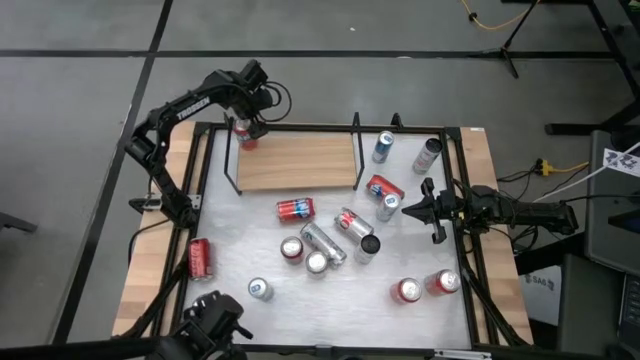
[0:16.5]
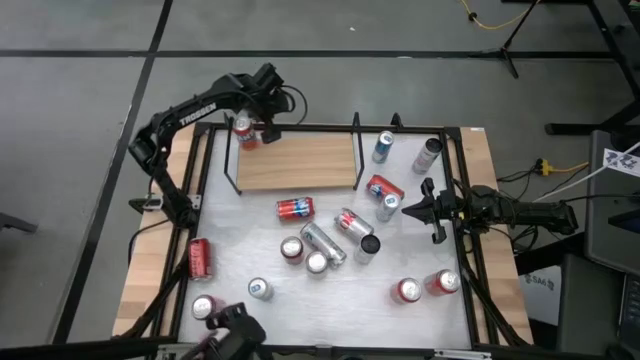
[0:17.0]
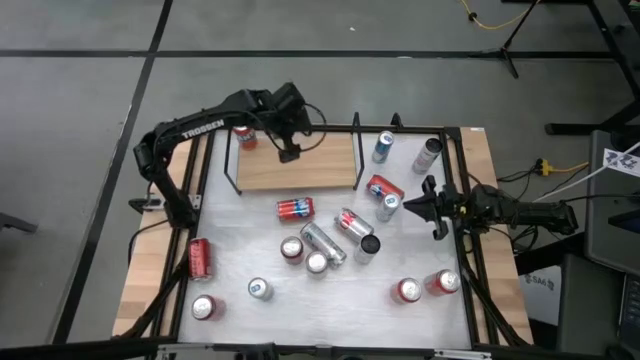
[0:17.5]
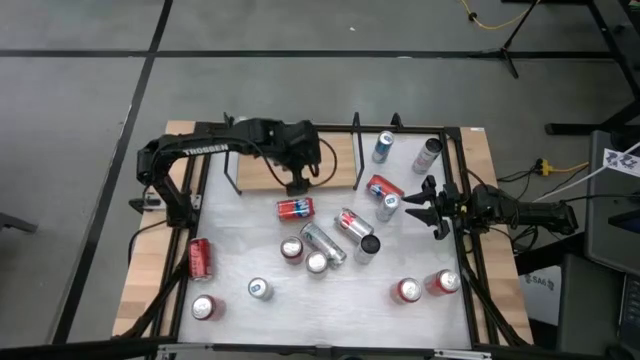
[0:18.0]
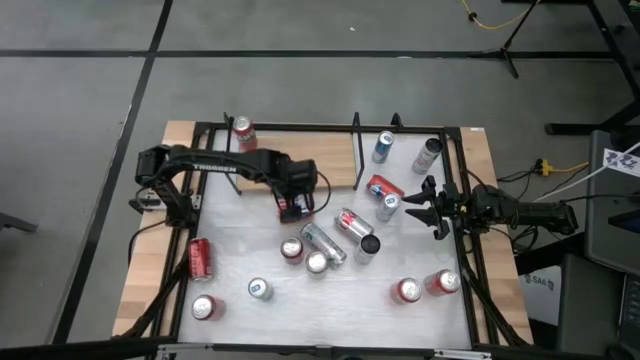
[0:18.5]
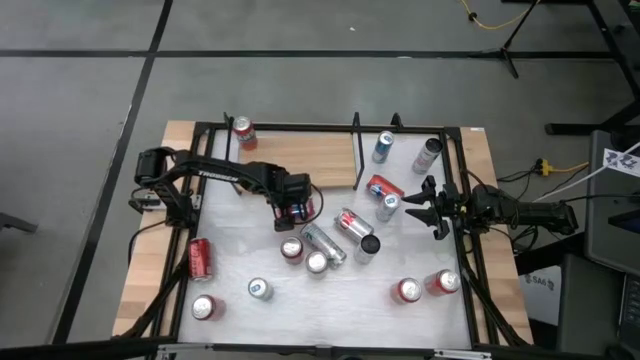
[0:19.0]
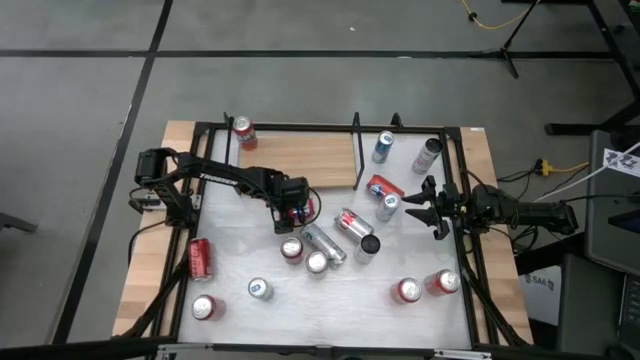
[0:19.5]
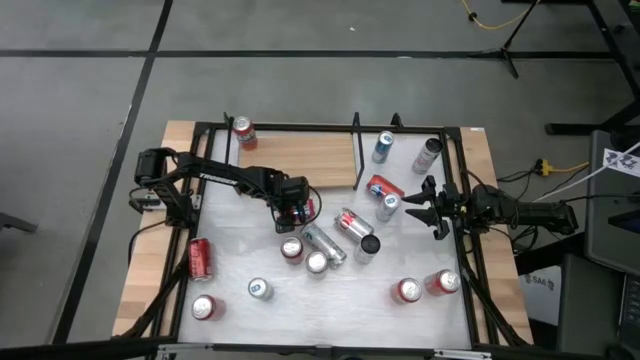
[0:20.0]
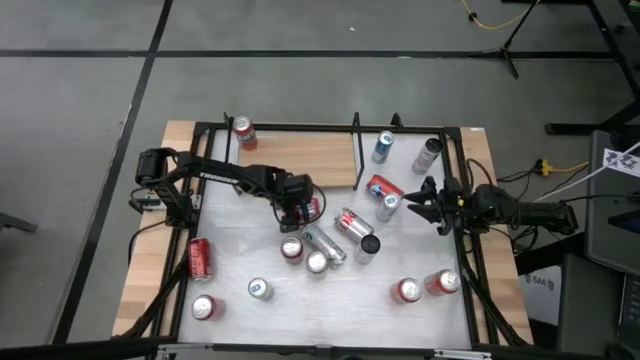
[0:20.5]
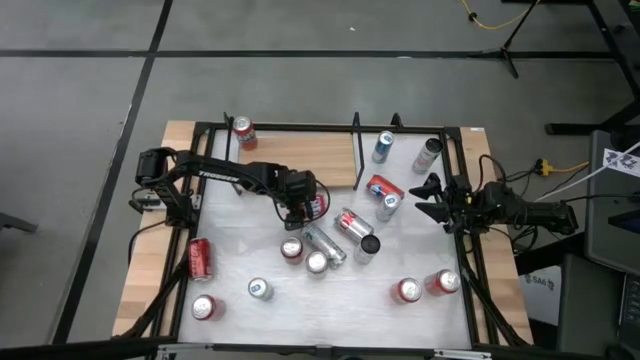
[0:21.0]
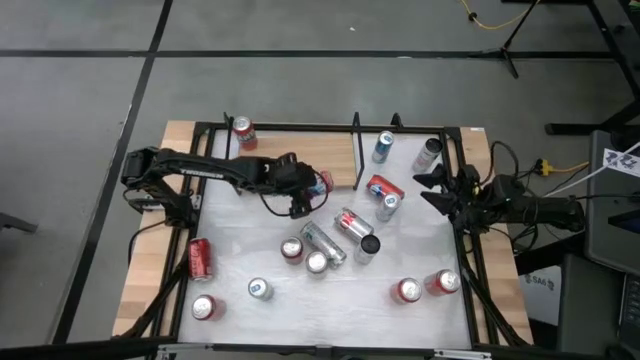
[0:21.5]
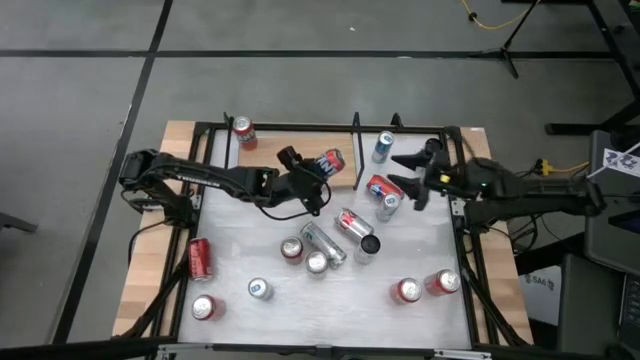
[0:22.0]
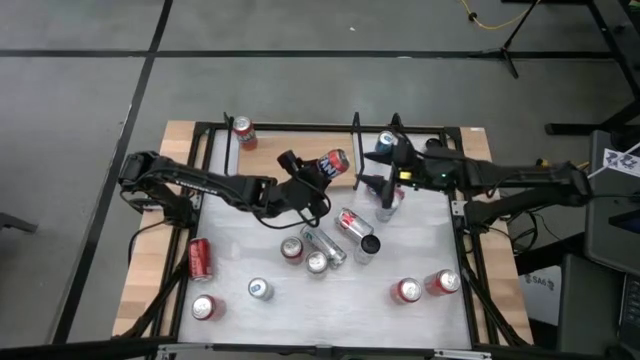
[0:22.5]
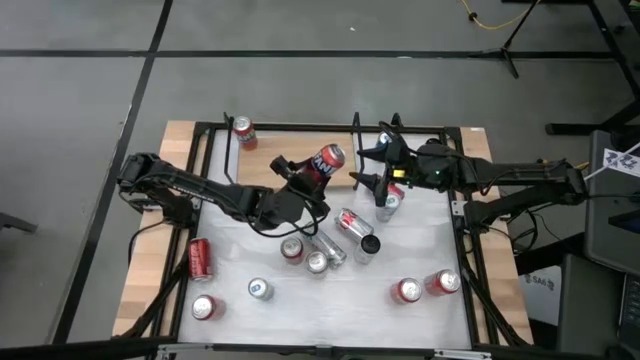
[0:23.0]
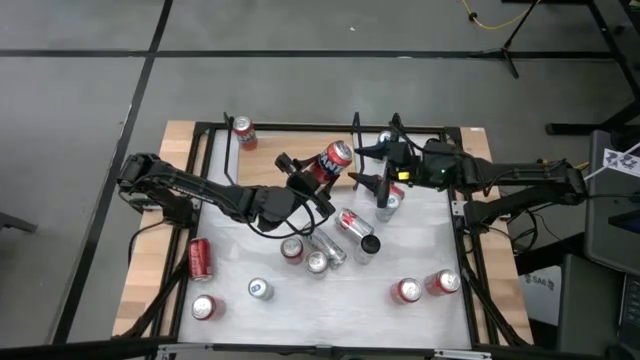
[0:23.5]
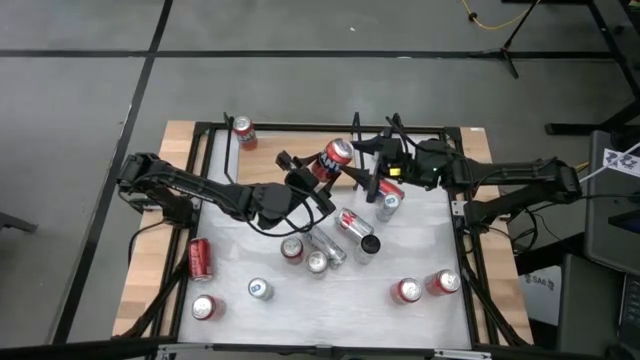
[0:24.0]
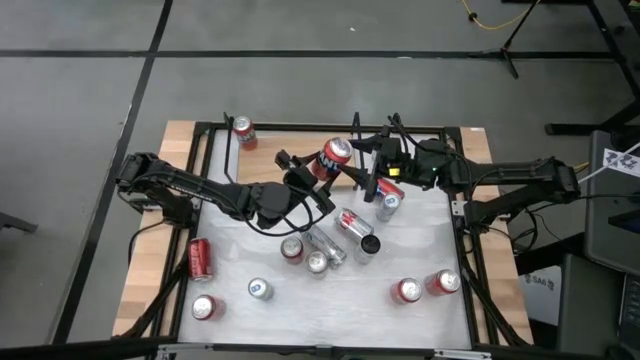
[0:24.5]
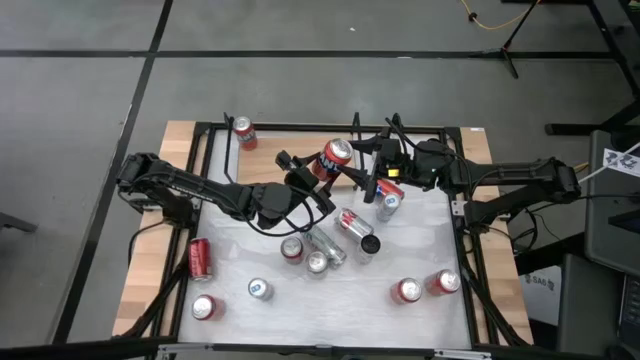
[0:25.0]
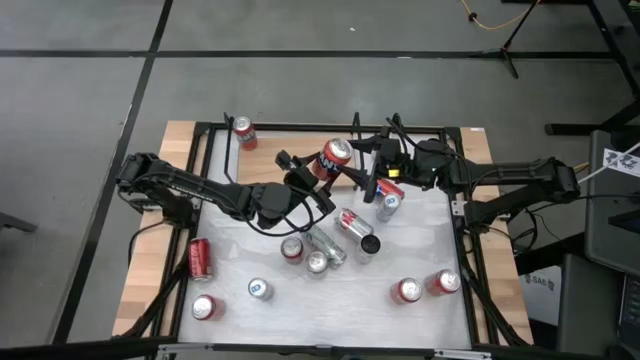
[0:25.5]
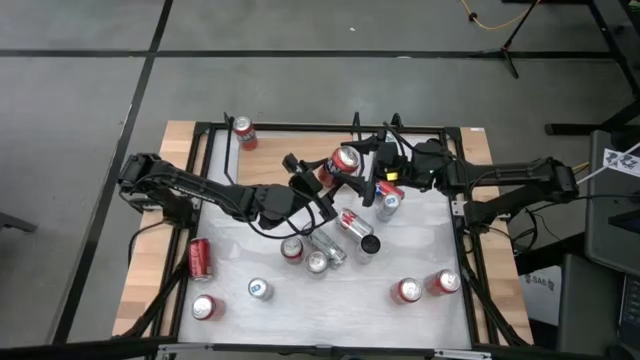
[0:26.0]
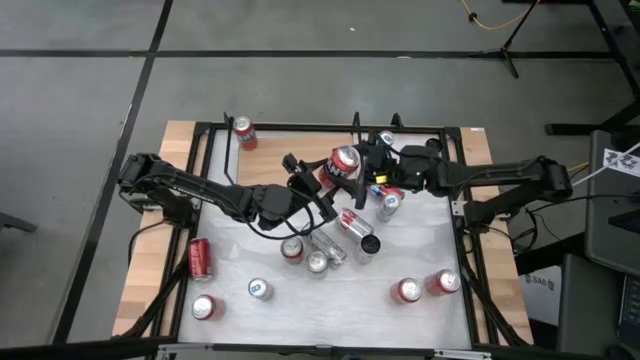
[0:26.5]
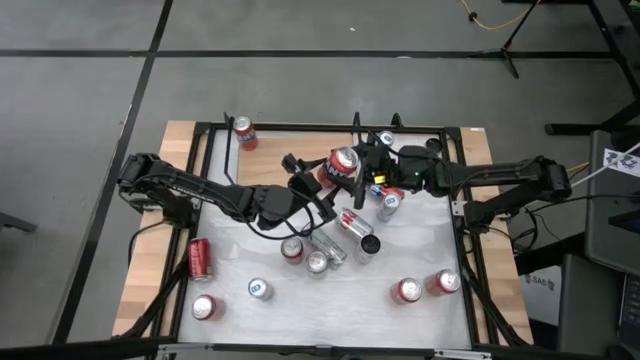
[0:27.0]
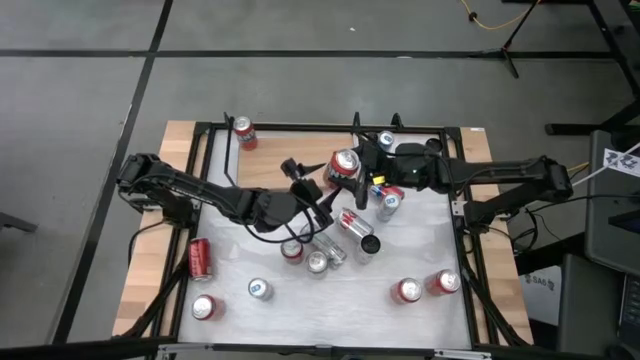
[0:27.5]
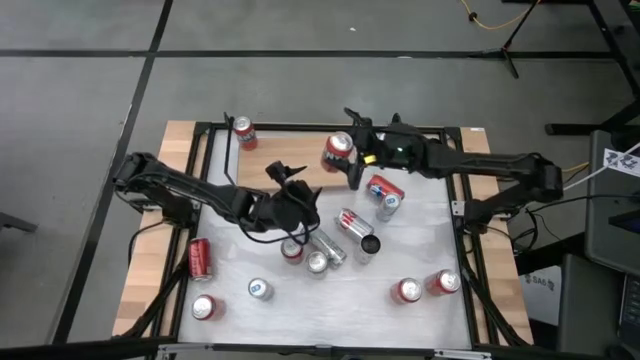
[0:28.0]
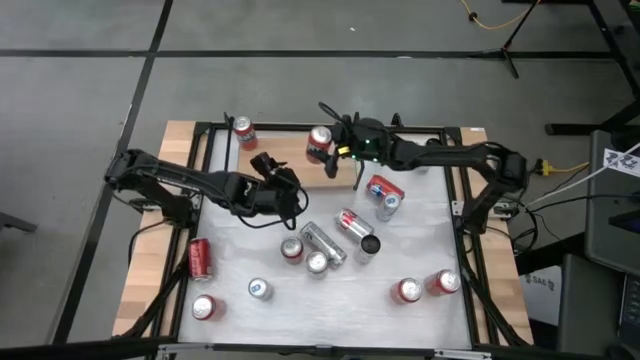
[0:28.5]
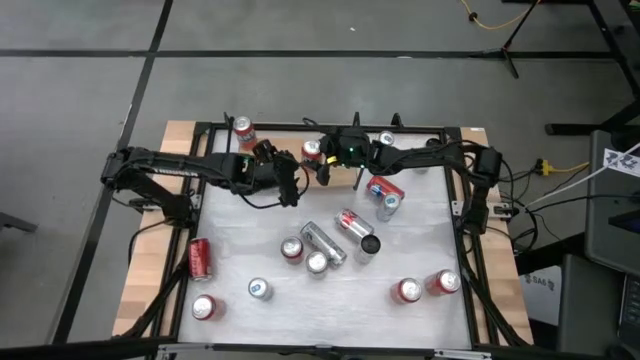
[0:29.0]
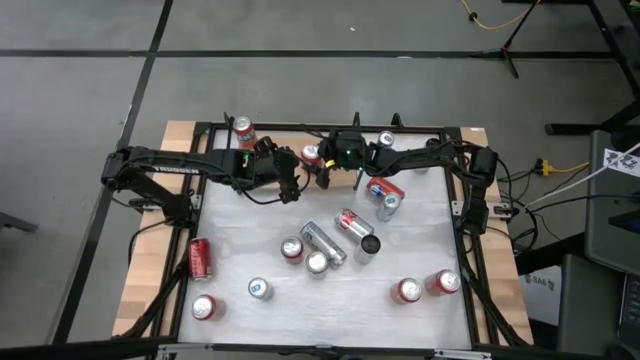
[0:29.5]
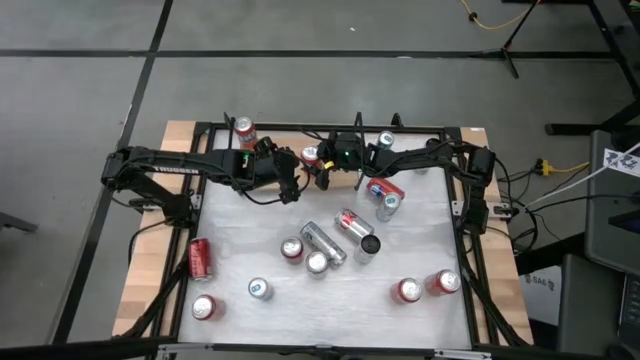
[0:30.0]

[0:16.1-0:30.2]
Task: Place canned beverage on shelf
Put the red soda can on the shelf aligned with the other red soda can

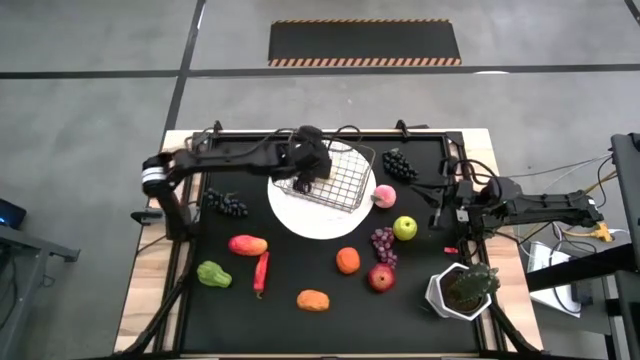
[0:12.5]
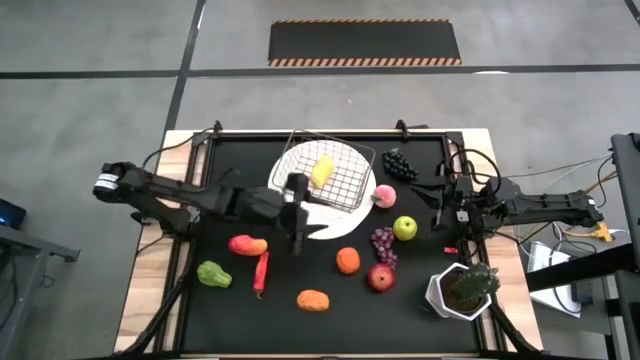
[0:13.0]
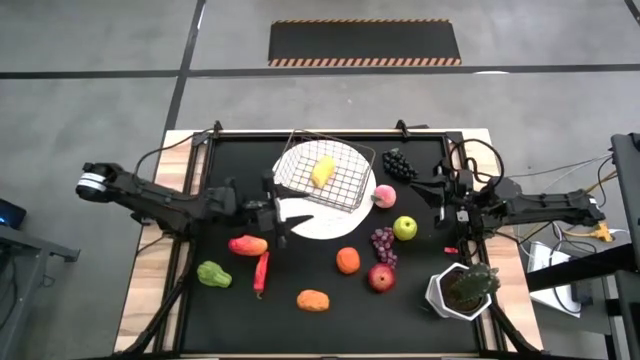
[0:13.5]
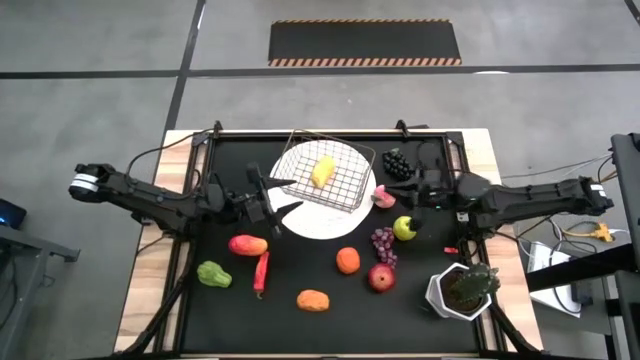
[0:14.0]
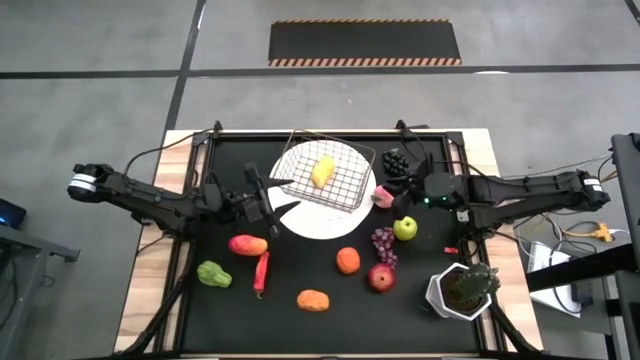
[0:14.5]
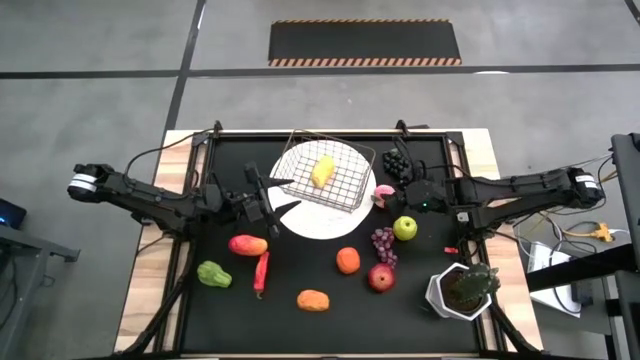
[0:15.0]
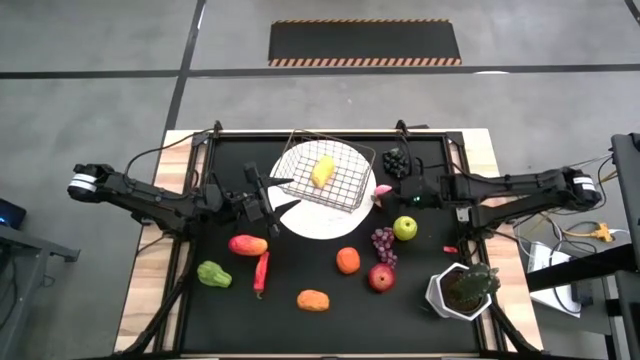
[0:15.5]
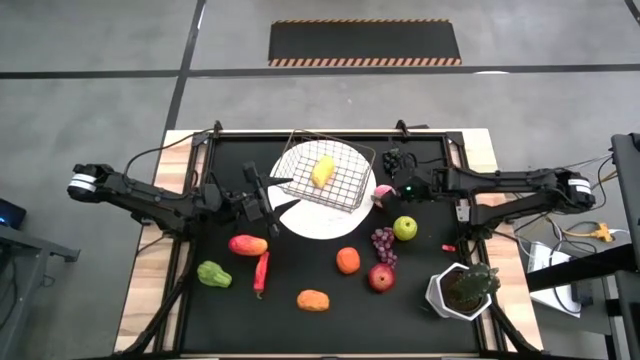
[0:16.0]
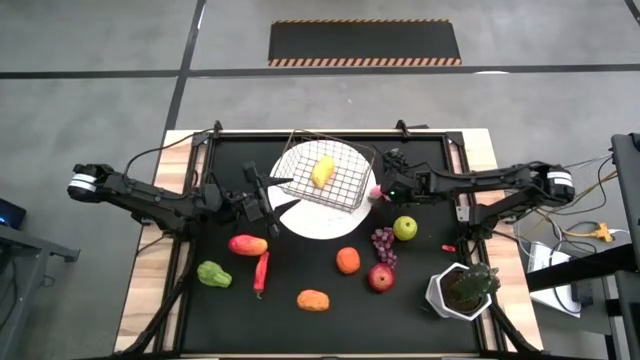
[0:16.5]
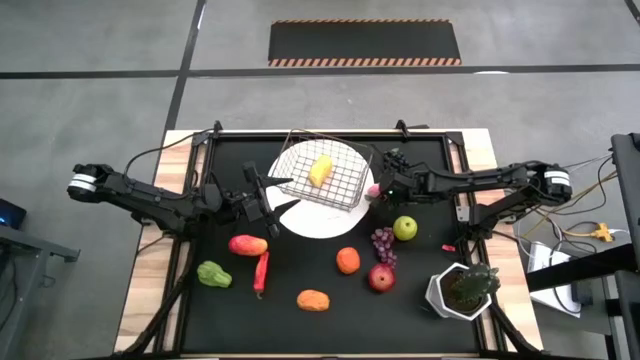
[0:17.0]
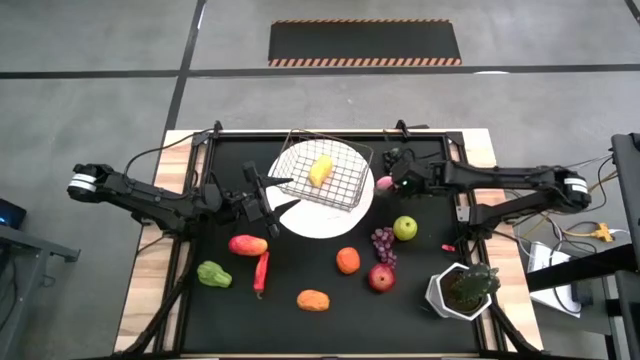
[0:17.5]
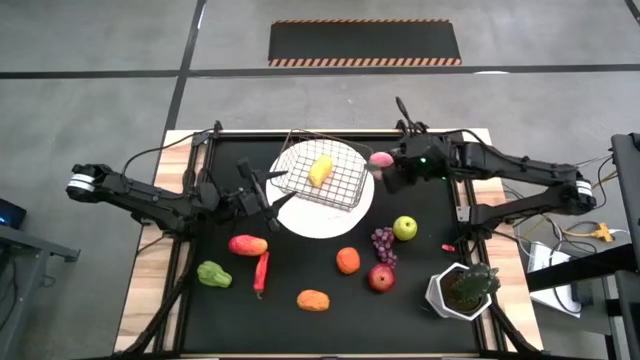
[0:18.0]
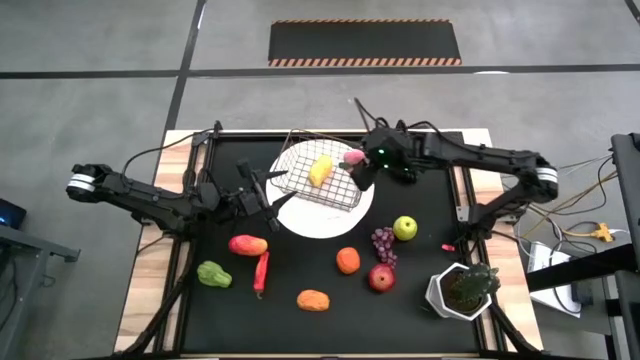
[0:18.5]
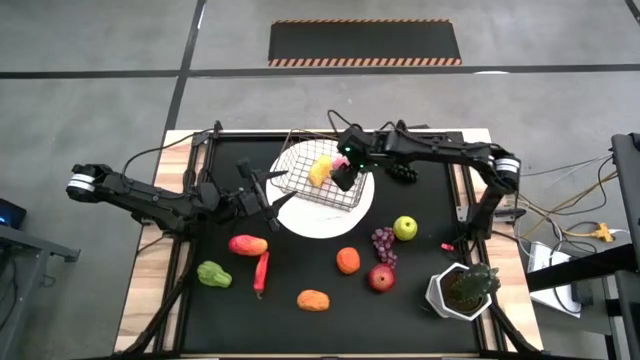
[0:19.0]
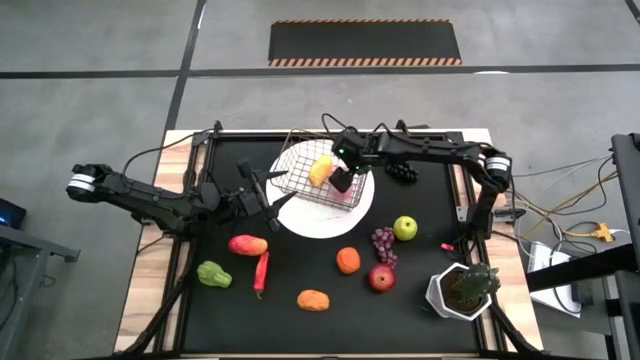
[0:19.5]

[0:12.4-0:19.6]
Task: Build produce basket
Put the peach into the silver basket
